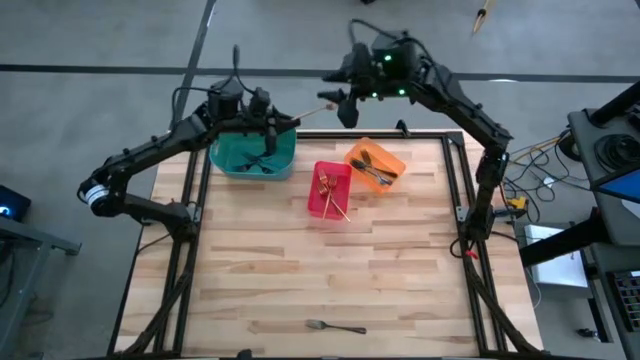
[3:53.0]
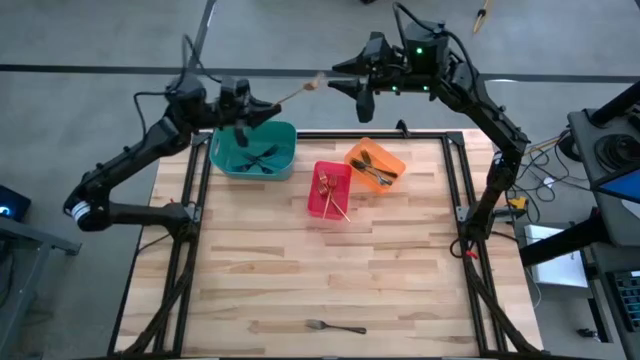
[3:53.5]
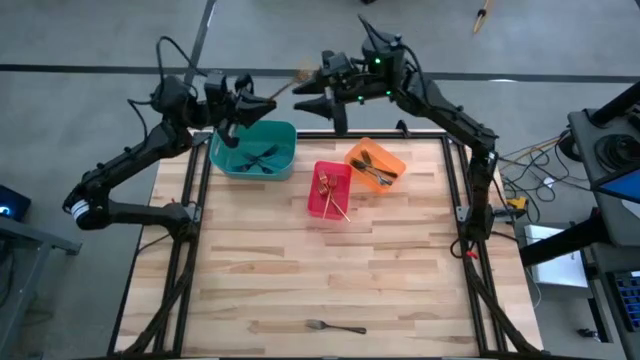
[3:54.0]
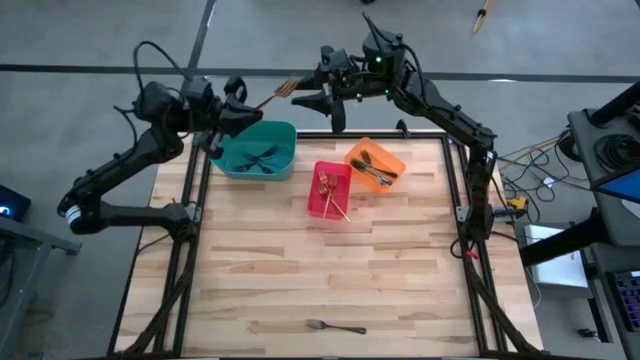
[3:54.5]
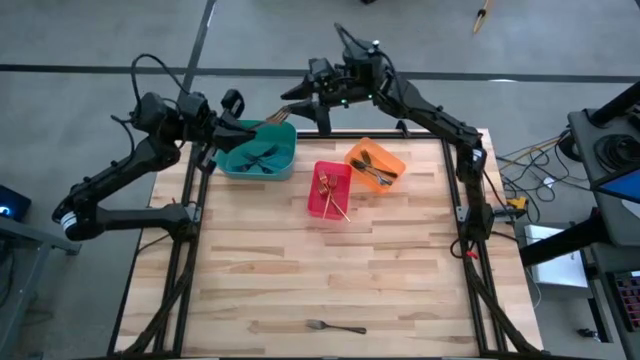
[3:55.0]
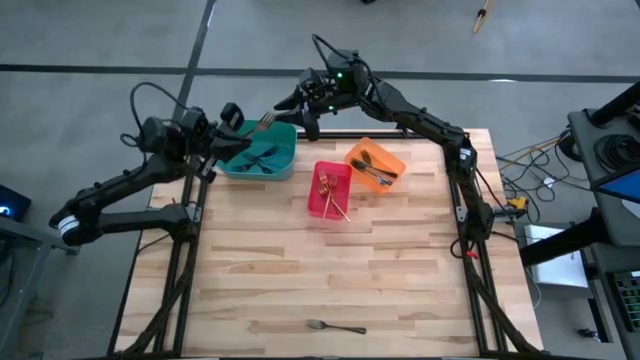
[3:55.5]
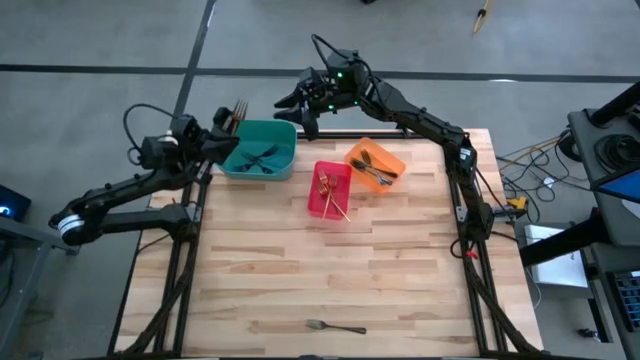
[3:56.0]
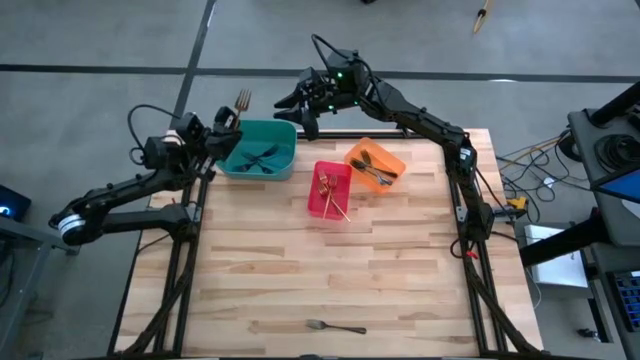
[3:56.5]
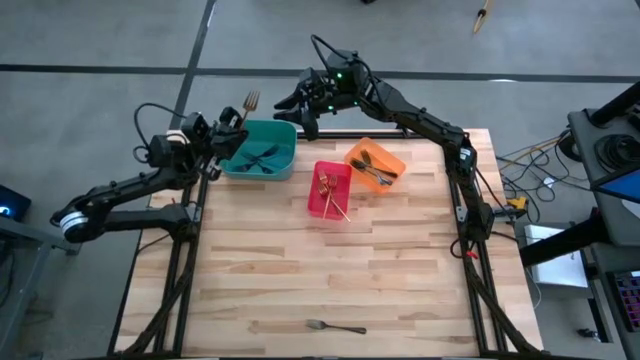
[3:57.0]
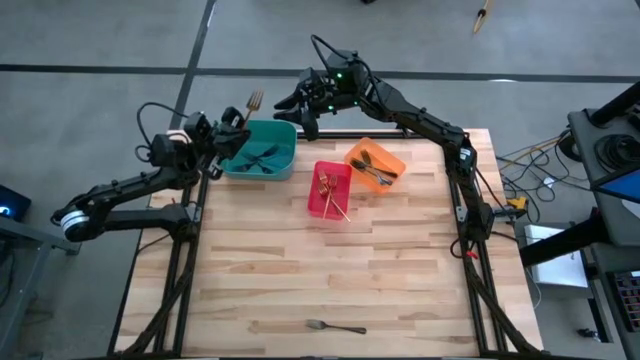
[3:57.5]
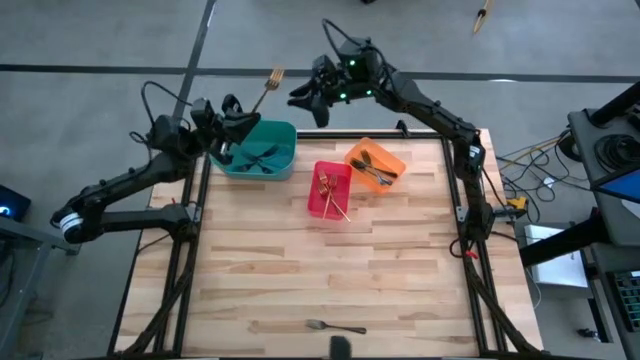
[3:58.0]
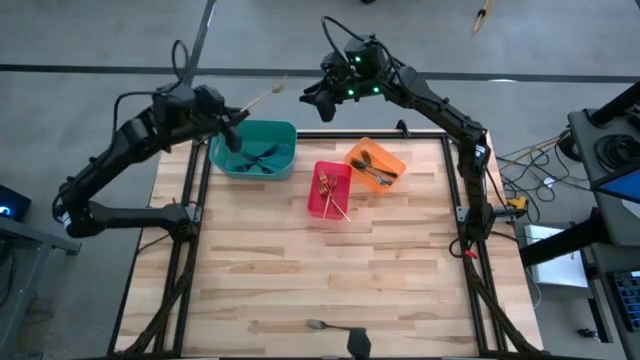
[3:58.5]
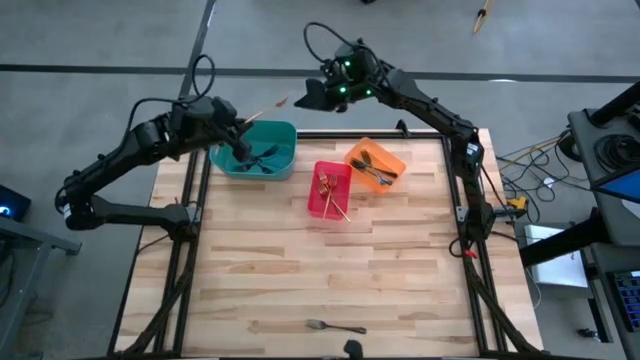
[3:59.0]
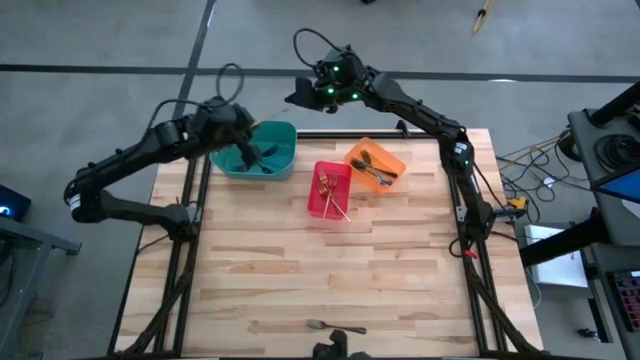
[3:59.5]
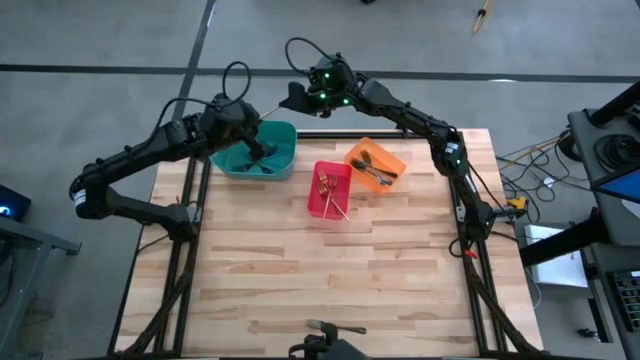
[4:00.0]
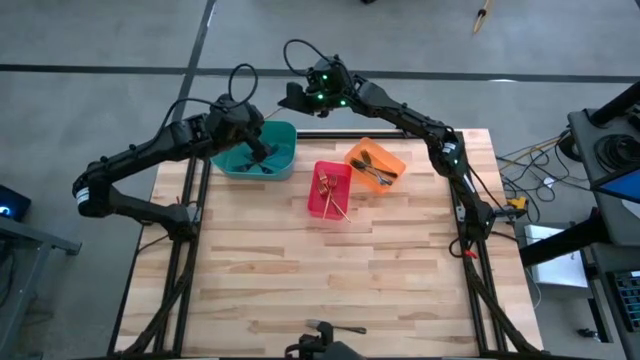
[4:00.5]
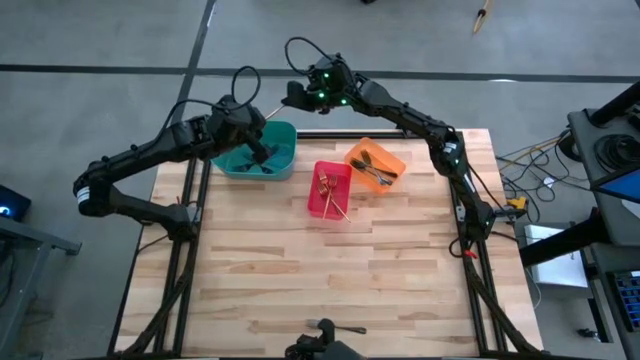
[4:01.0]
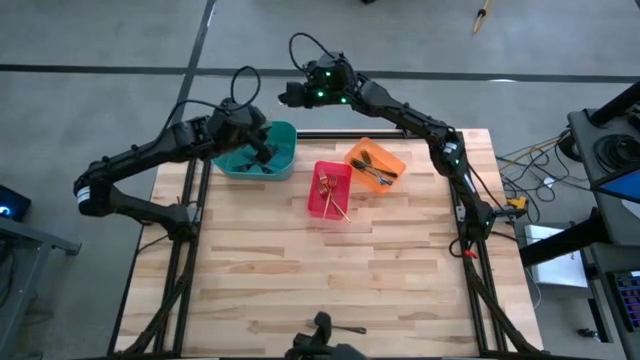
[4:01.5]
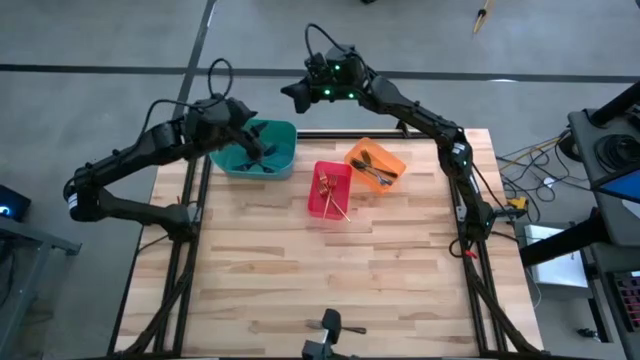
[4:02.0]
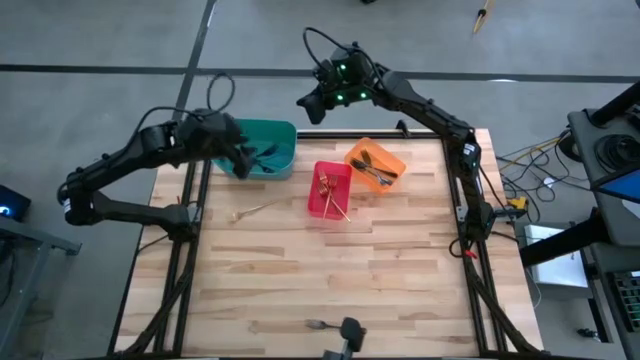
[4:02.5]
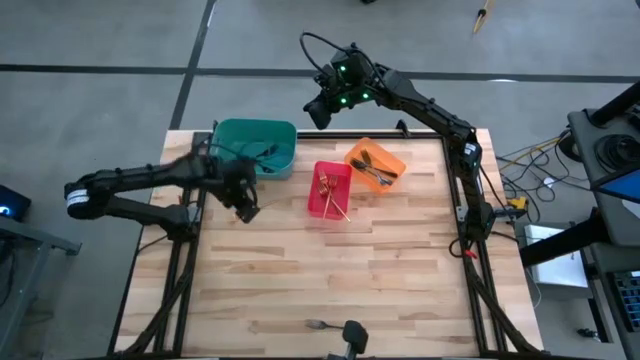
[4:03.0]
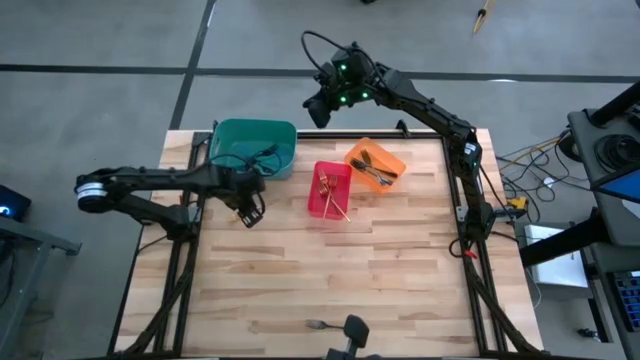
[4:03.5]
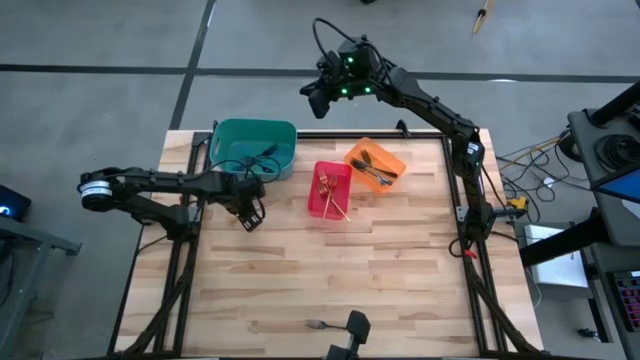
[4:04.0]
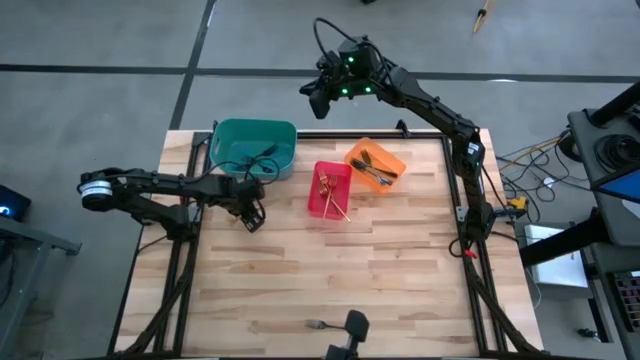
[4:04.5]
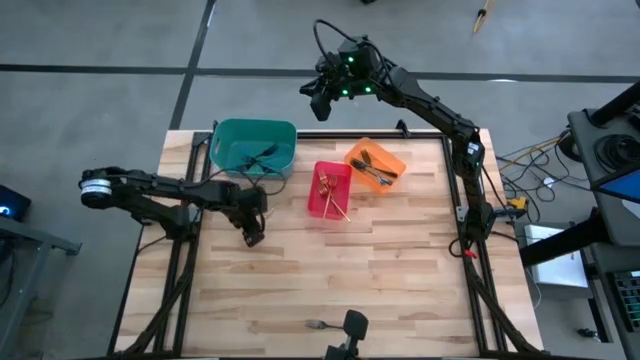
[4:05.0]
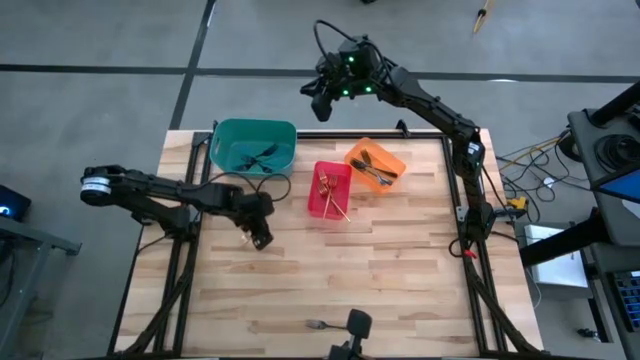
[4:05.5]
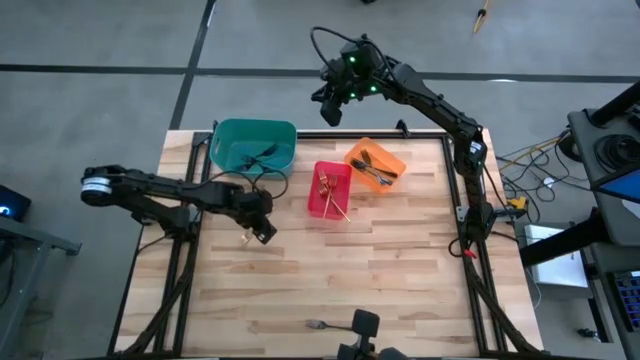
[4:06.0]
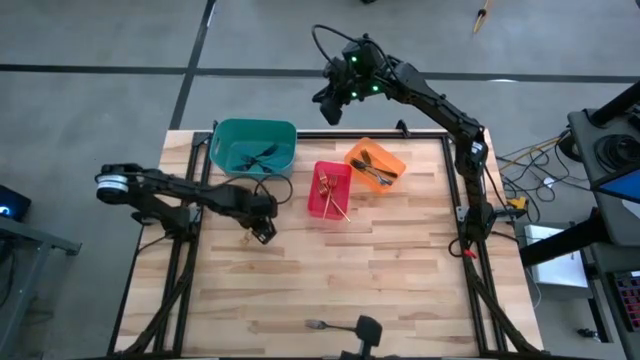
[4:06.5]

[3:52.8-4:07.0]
Task: Sort silverware by color (type)
Put the golden fork into the red bin

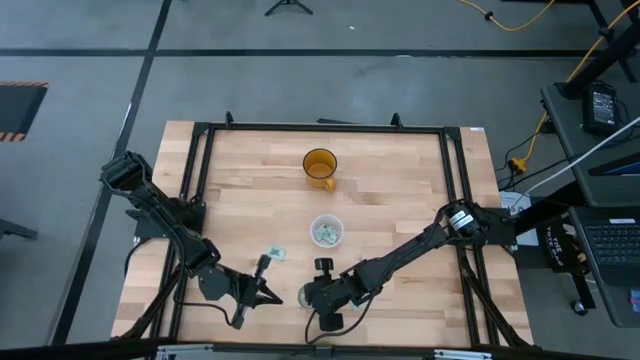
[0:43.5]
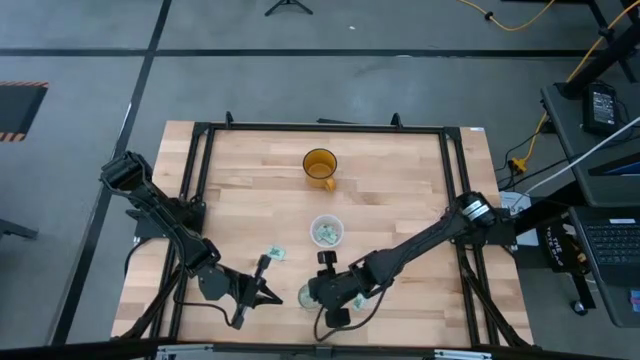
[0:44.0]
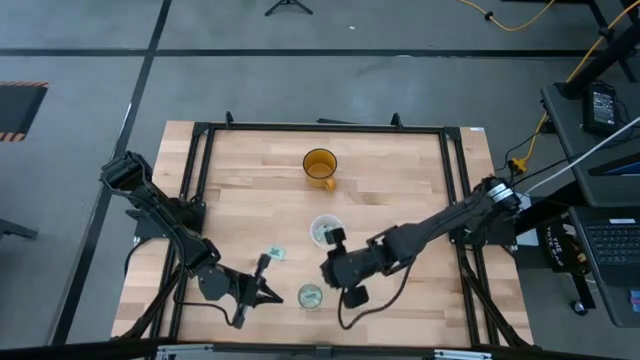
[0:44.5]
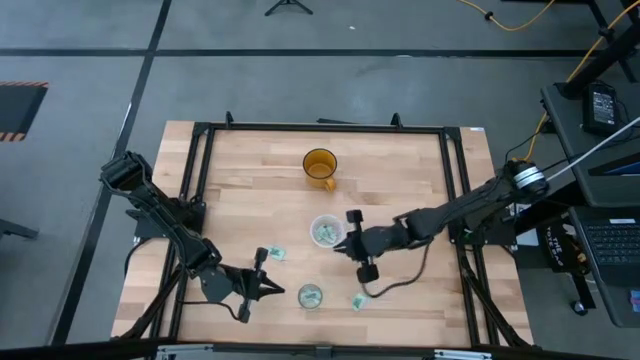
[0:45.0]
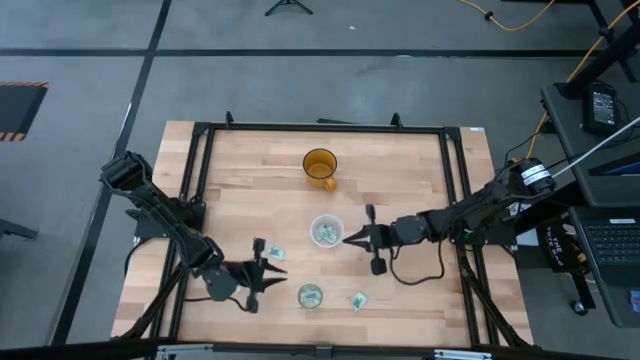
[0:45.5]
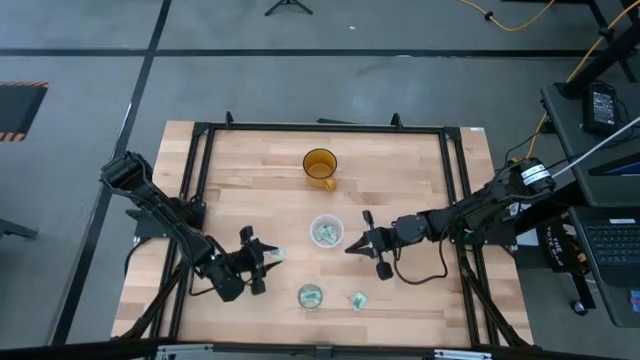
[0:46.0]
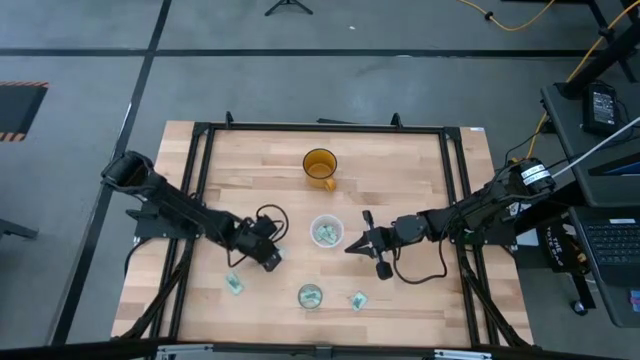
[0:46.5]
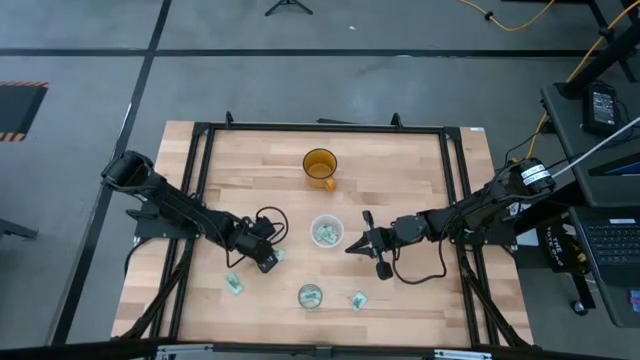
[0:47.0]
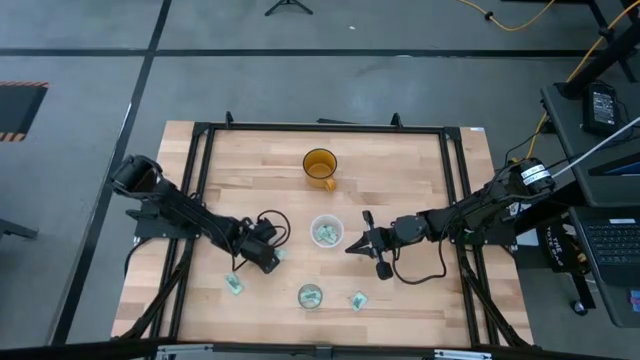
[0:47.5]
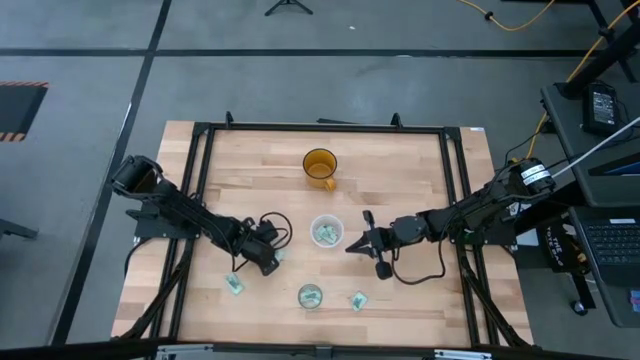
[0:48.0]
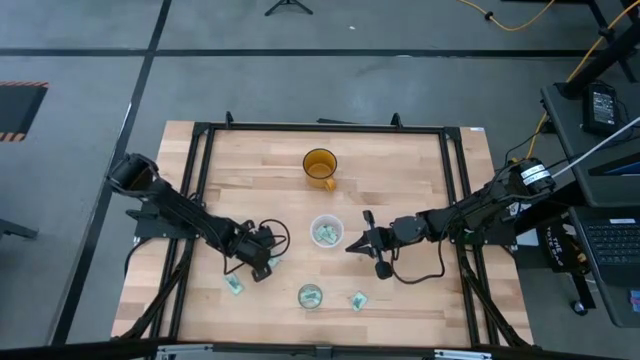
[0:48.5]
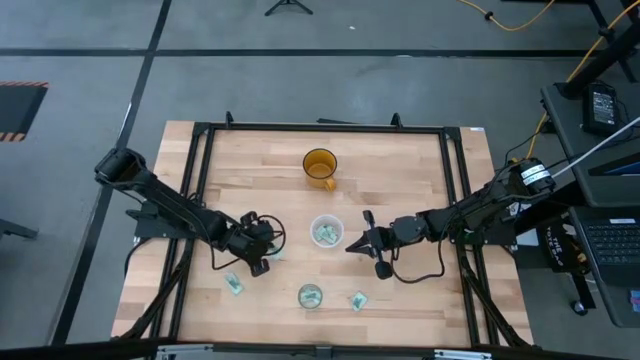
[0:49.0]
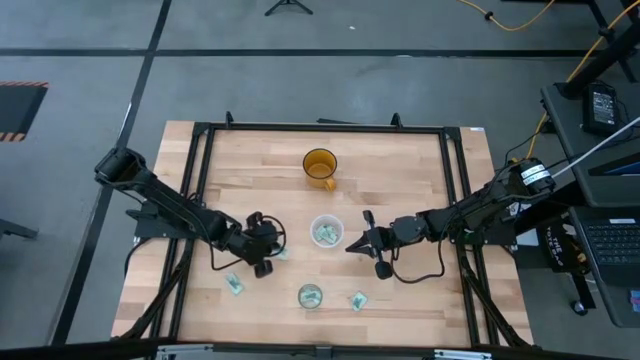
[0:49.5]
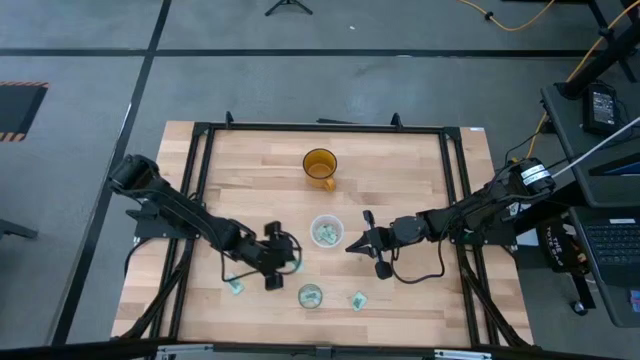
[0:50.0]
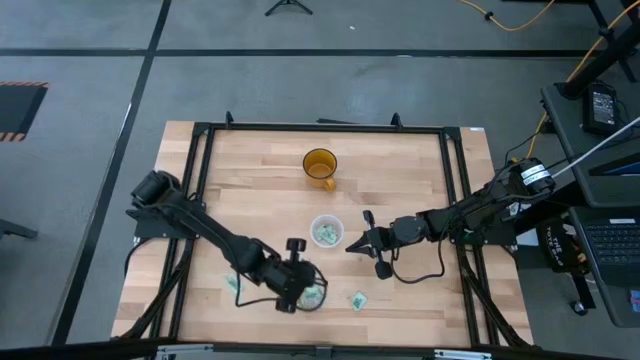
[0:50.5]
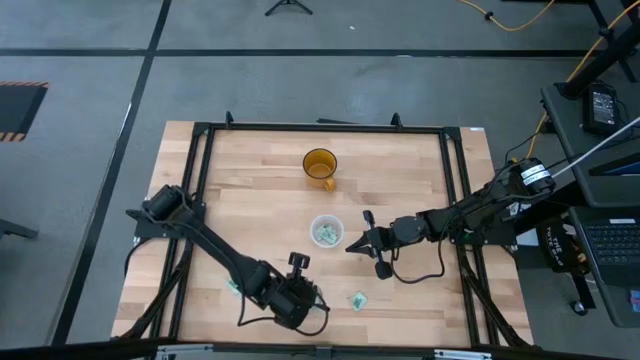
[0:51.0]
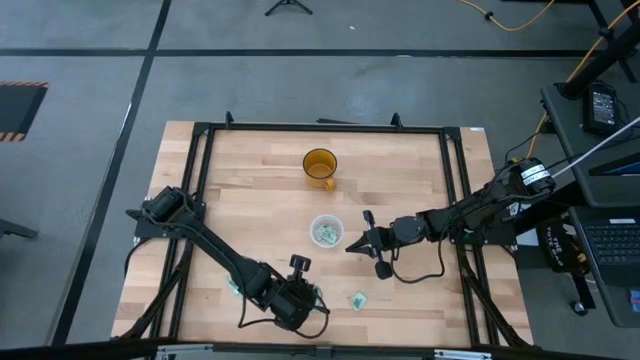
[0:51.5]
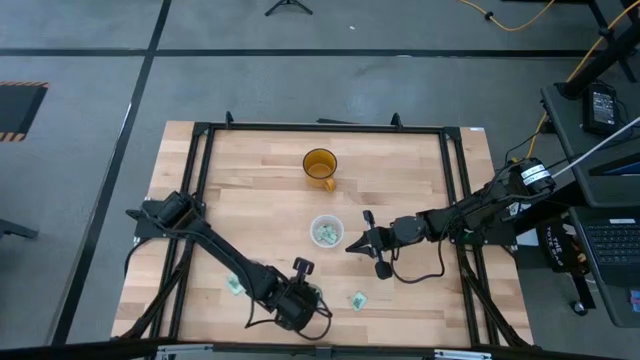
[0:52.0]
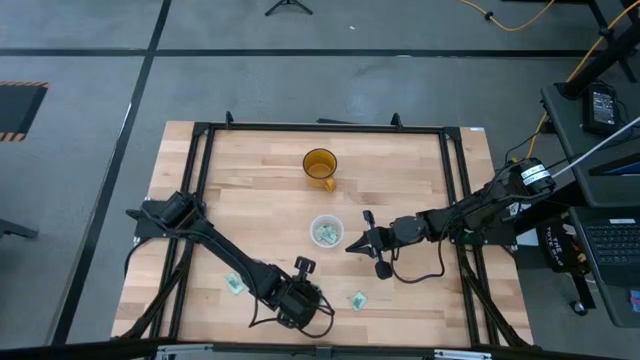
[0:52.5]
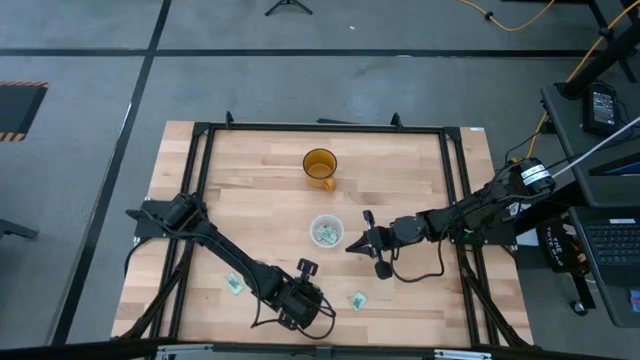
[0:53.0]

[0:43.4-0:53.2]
Task: Pick and place Stevia / Truvia into bins
Put the stevia packet into the transparent glass container
